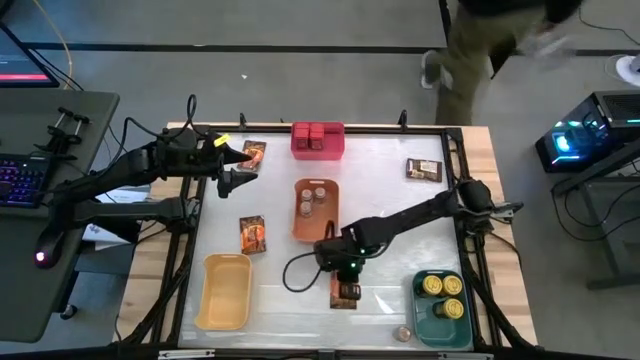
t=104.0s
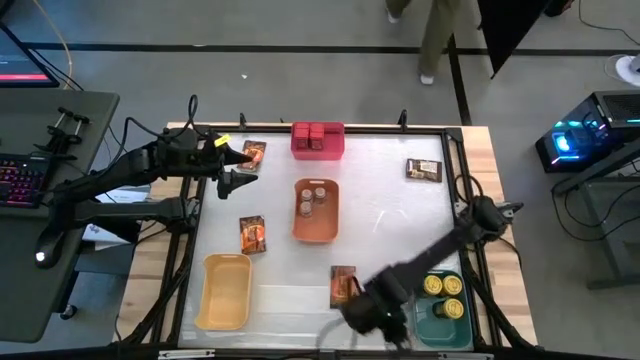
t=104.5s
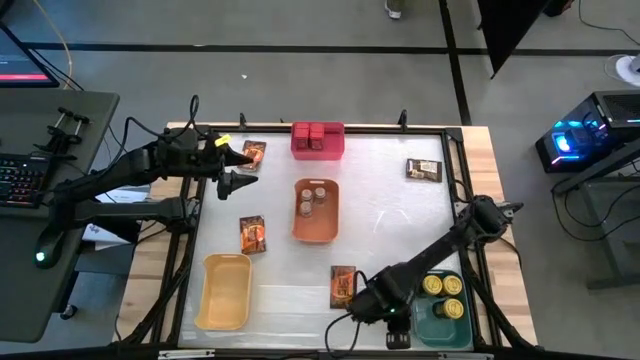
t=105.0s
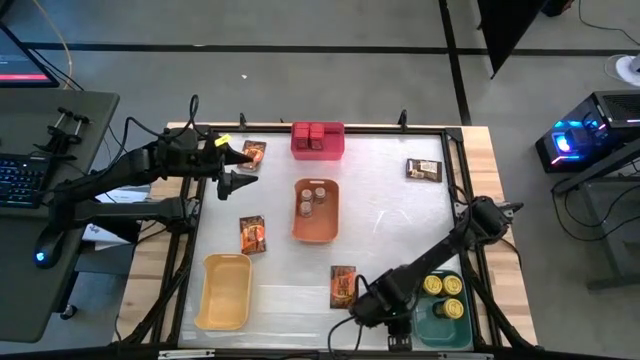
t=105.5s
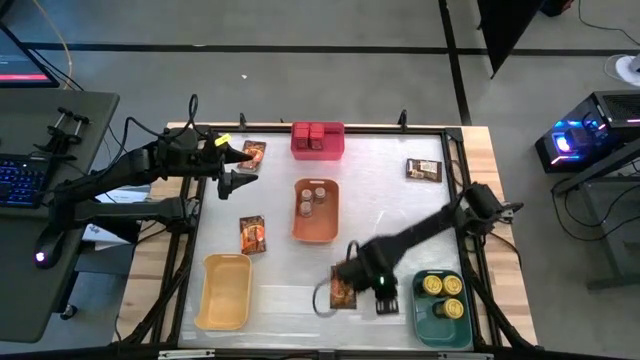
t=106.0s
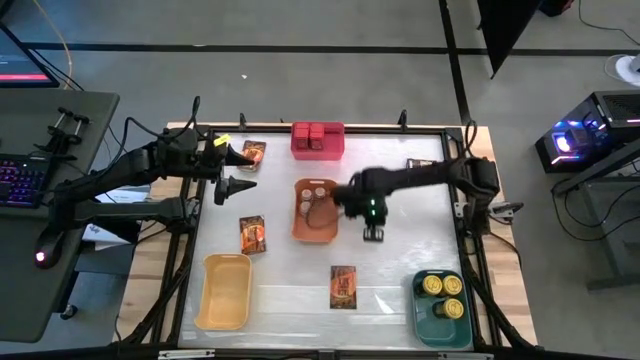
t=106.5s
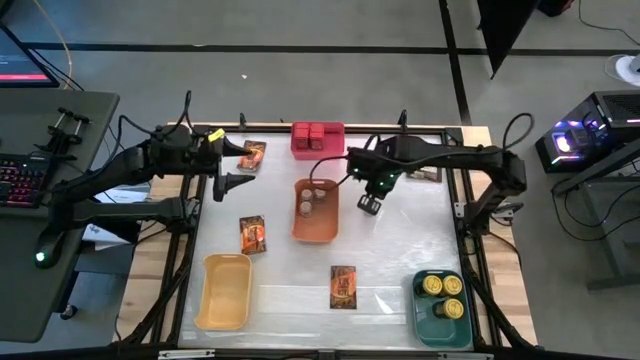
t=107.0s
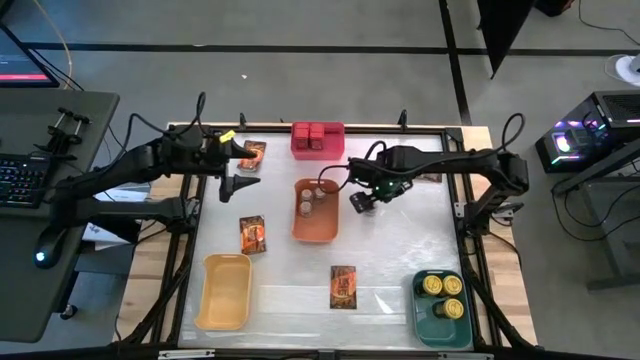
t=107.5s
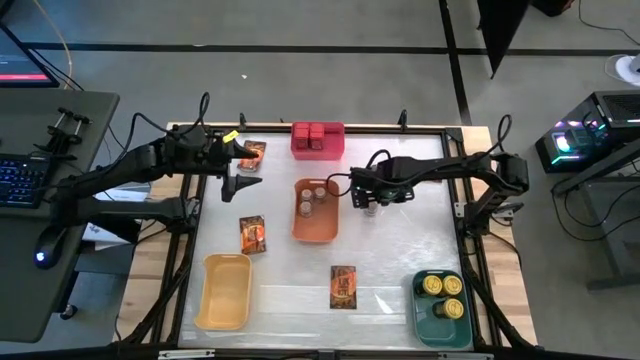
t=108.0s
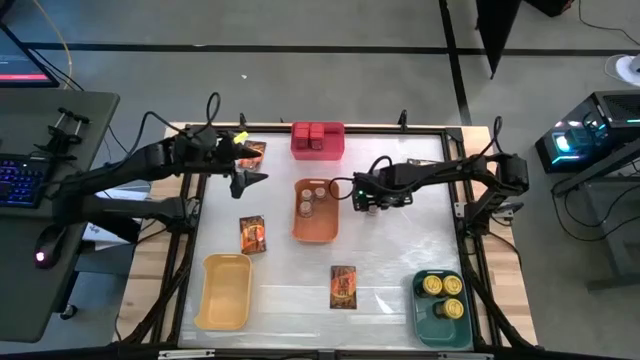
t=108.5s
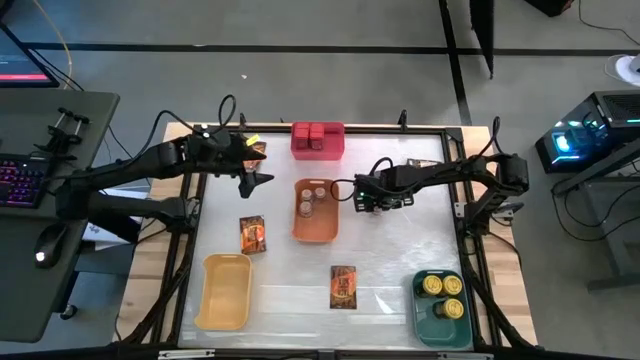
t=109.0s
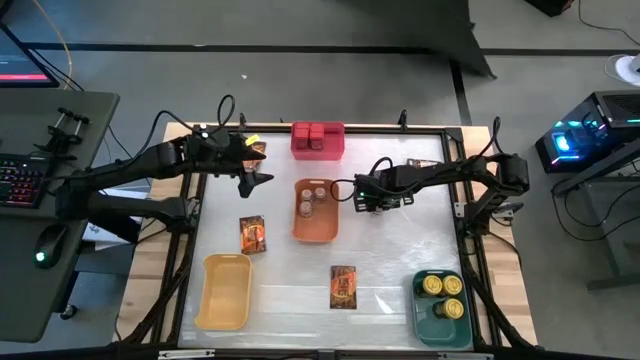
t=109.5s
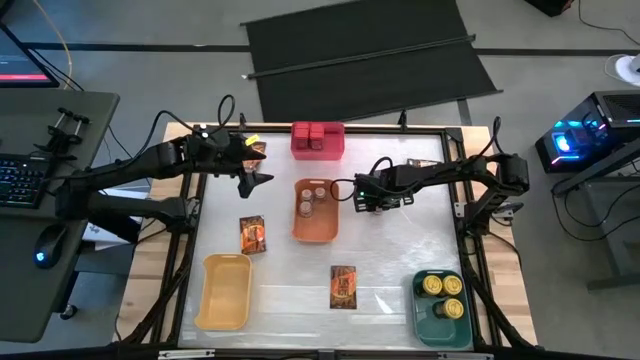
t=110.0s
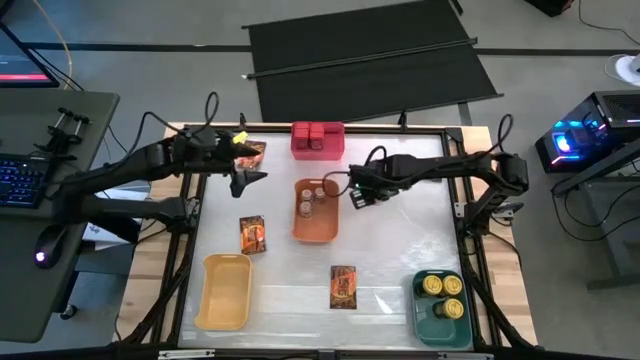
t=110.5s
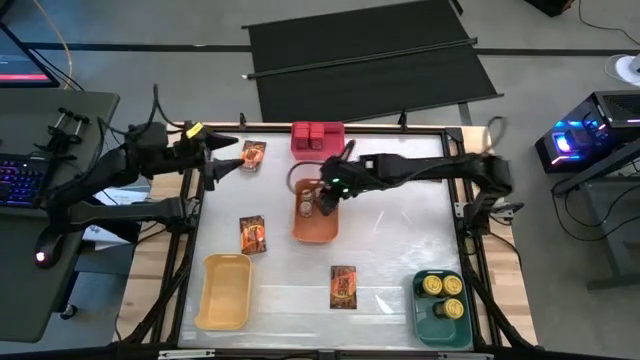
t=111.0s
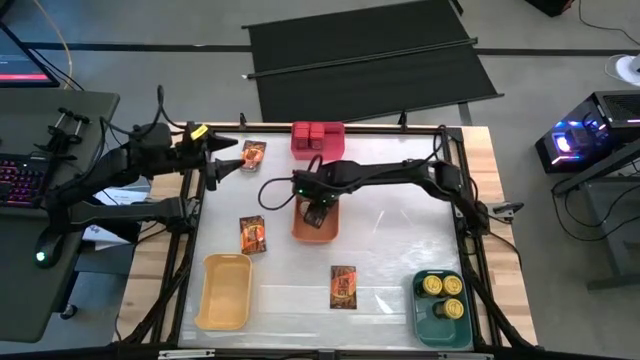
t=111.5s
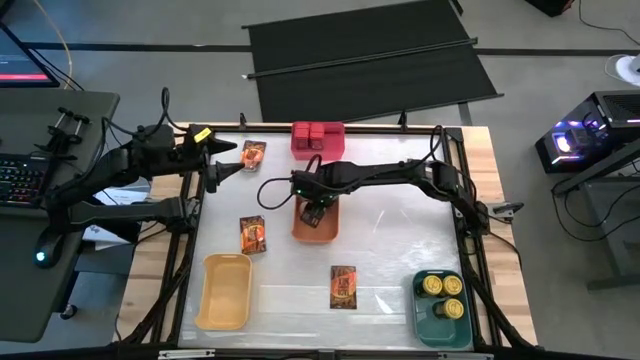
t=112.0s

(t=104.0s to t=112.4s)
Task: Sort spices by type
Put the brown spice bottle into the orange bin

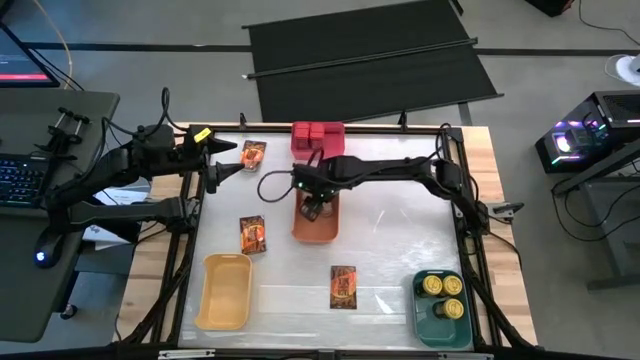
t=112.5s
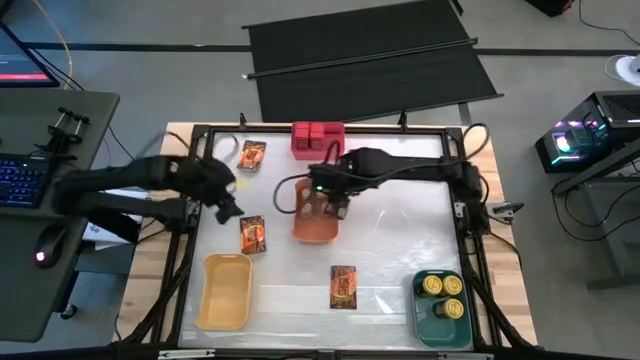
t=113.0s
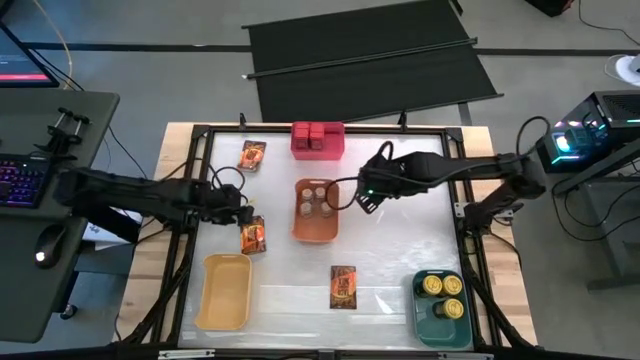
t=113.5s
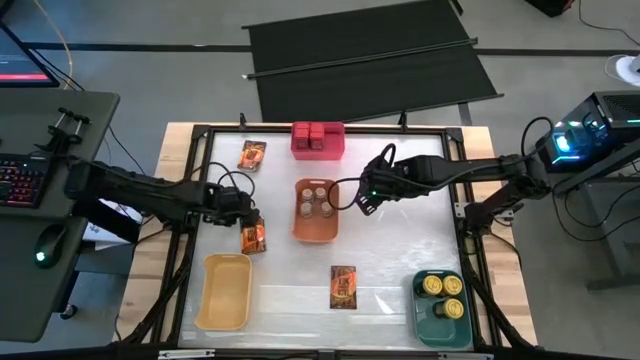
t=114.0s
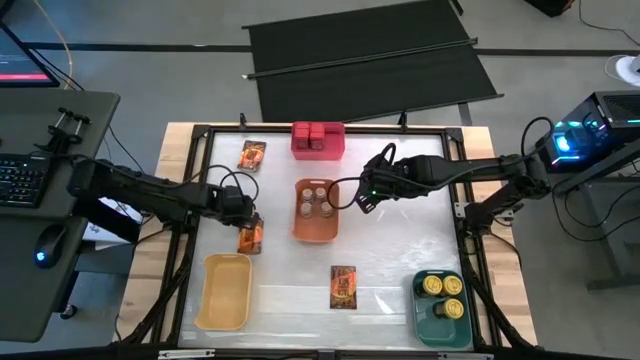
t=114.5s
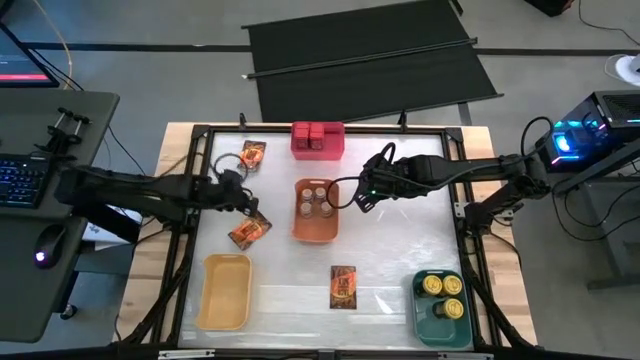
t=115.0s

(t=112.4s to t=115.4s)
Put the middle left orange spice pack into the yellow bin

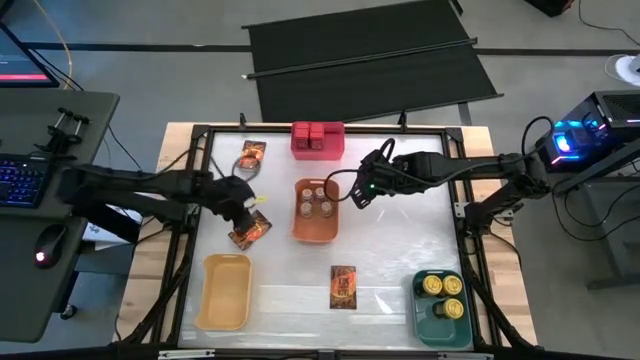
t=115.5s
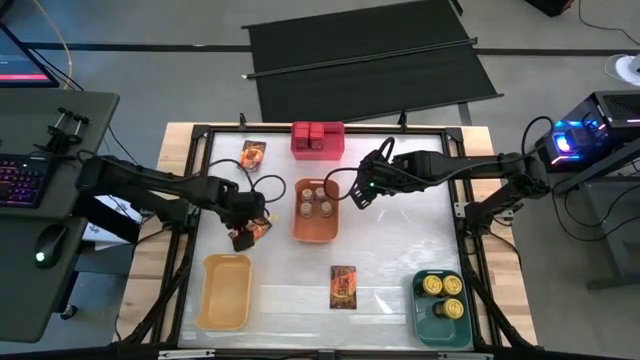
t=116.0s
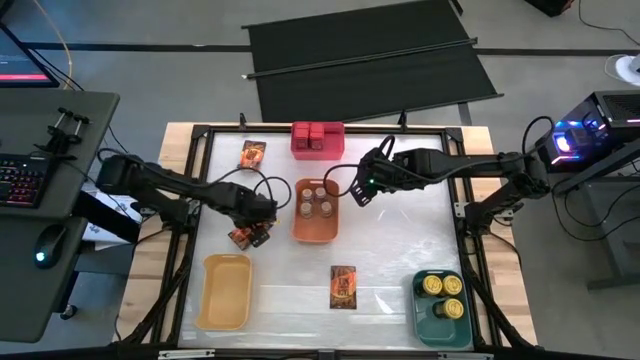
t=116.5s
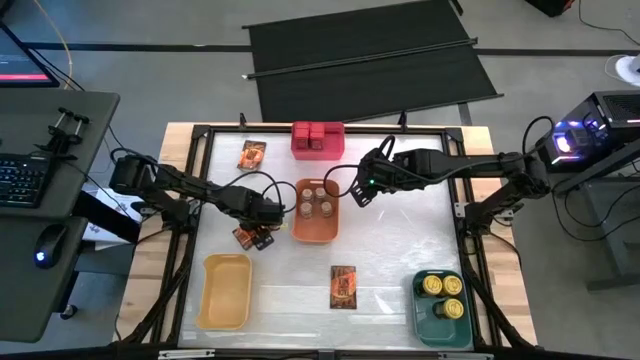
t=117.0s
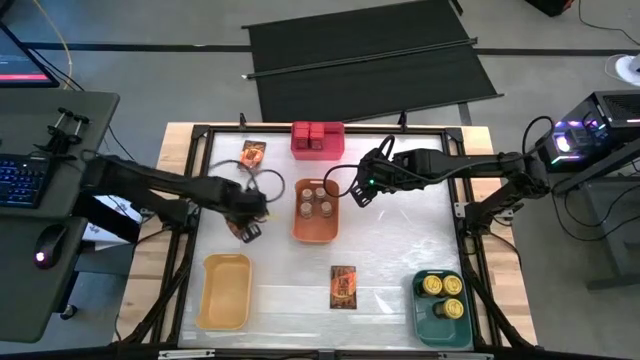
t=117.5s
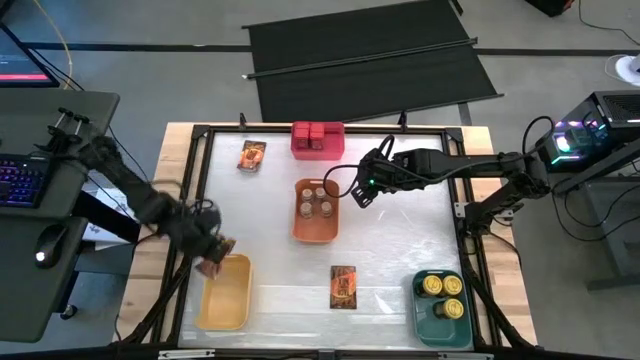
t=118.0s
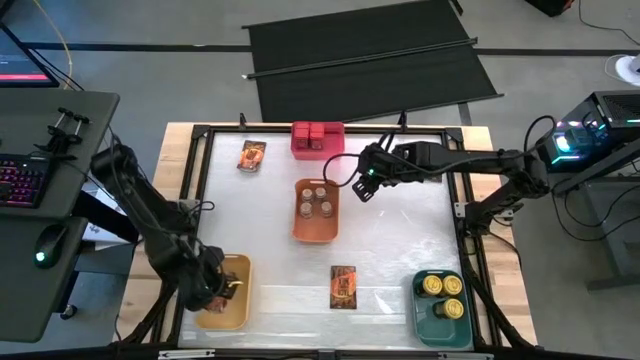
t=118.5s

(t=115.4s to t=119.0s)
Put the middle left orange spice pack into the yellow bin

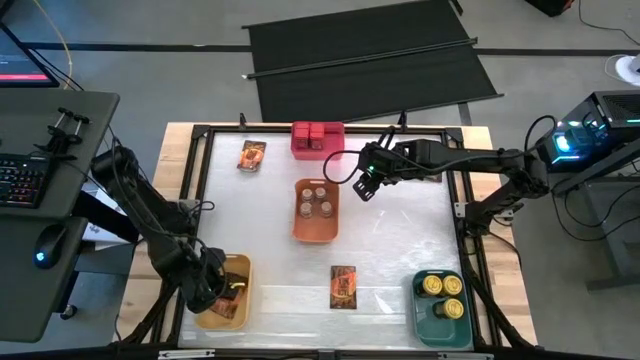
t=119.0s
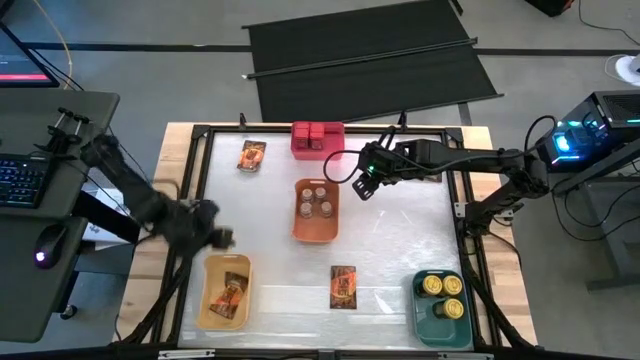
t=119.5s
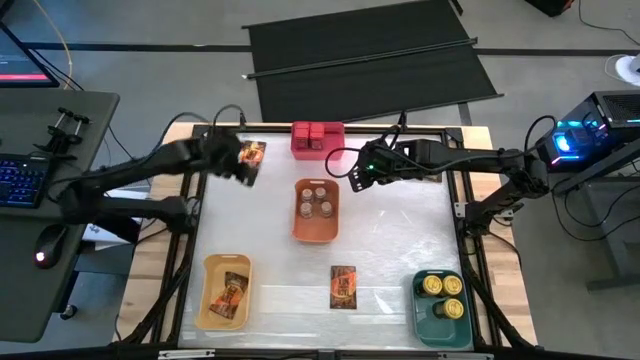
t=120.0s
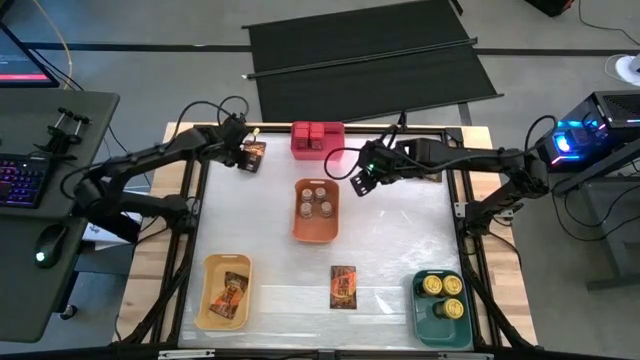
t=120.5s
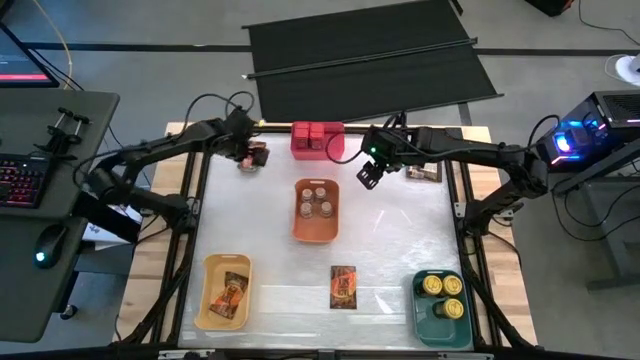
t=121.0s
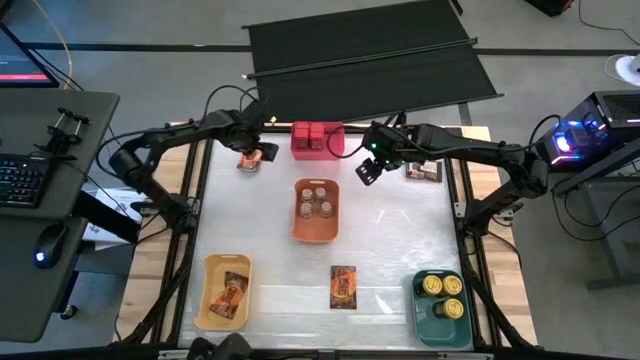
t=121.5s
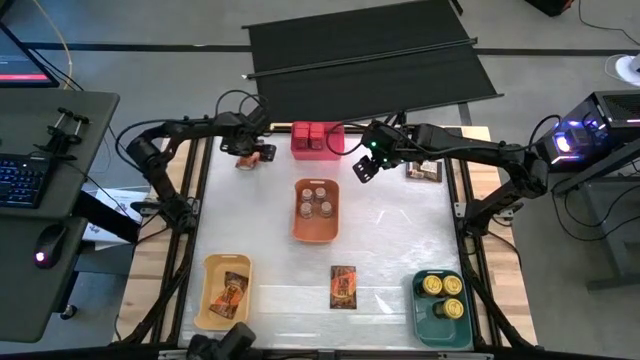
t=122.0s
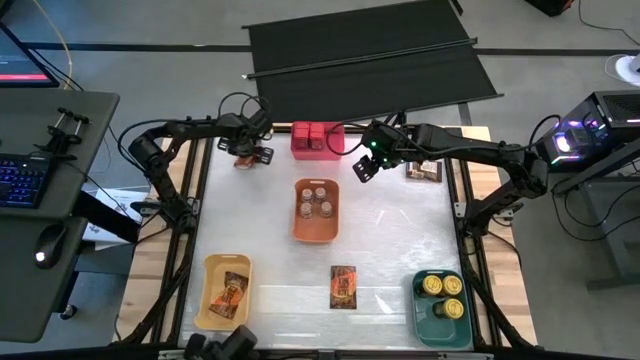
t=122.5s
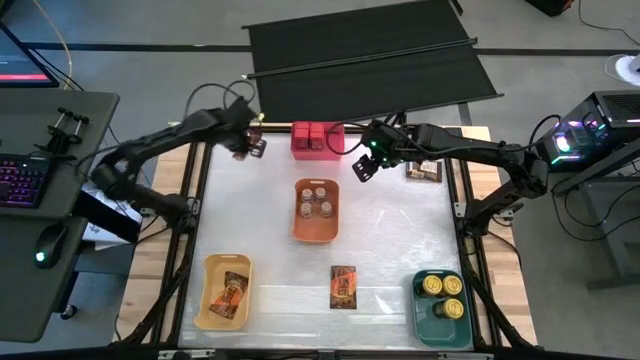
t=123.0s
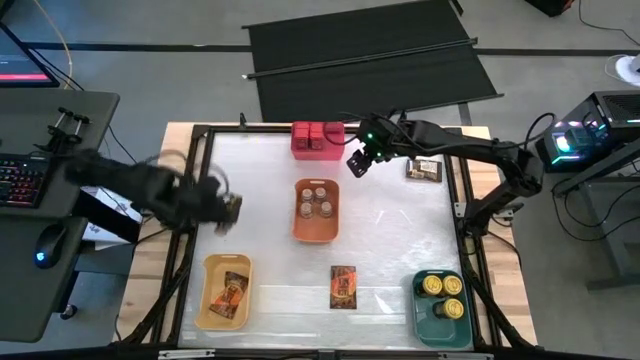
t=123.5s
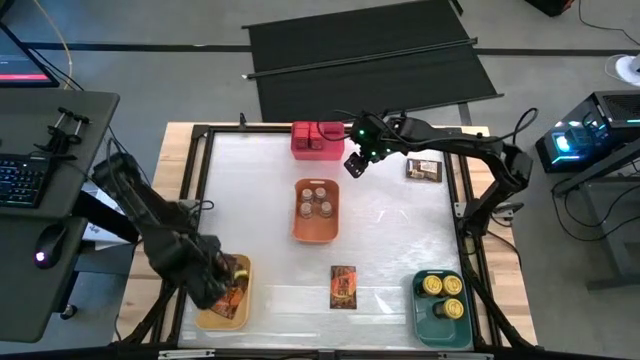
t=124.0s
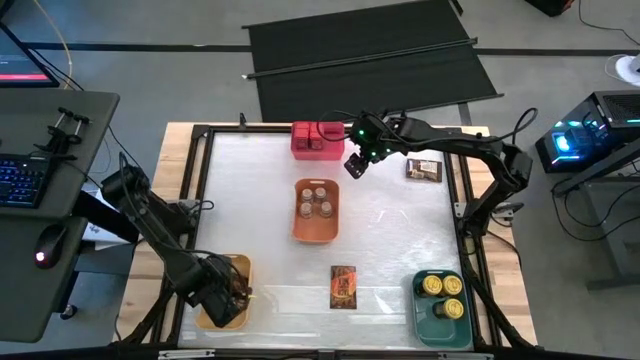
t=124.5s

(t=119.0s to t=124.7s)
Put the top left orange spice pack into the yellow bin
